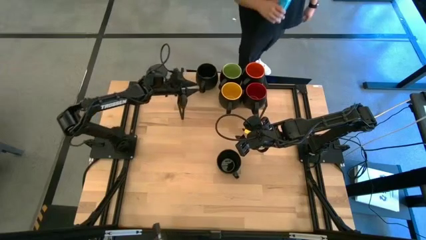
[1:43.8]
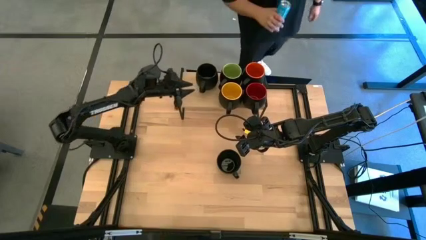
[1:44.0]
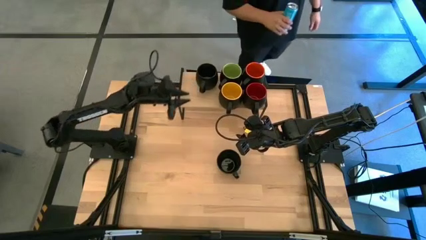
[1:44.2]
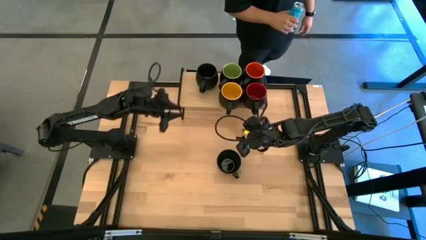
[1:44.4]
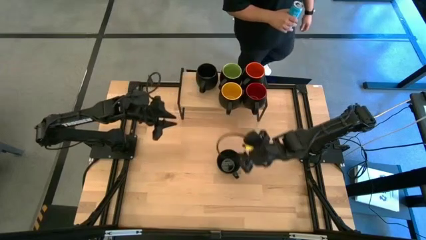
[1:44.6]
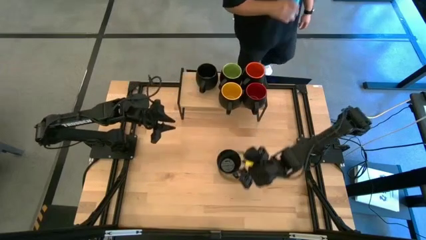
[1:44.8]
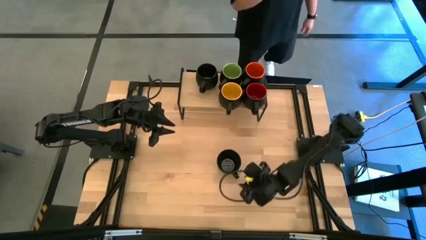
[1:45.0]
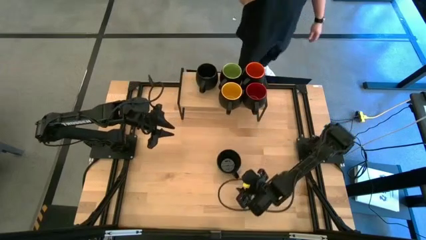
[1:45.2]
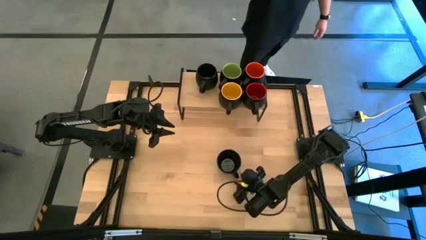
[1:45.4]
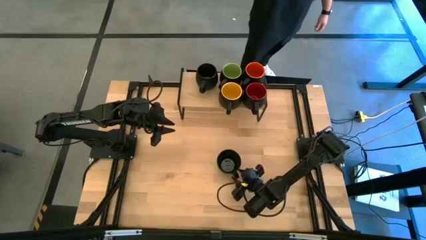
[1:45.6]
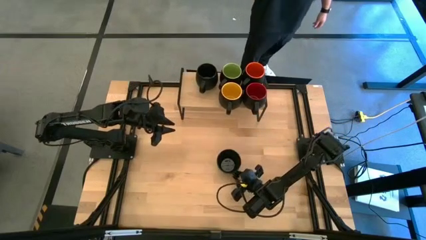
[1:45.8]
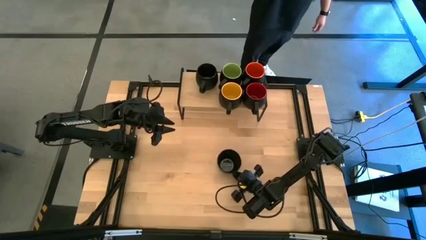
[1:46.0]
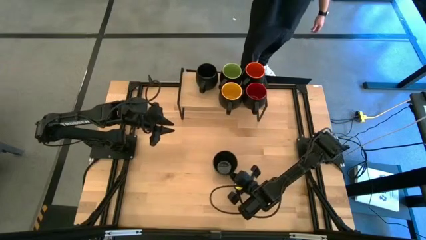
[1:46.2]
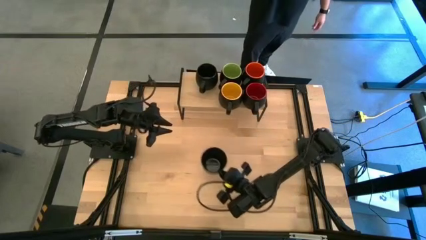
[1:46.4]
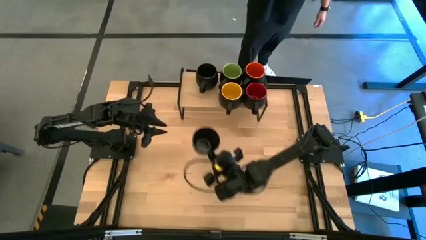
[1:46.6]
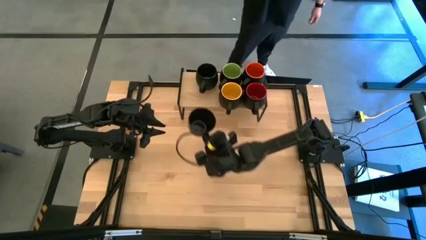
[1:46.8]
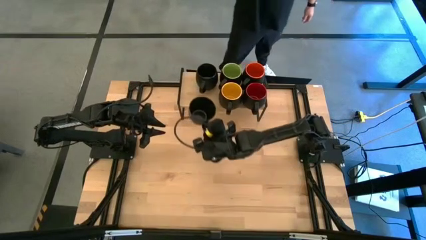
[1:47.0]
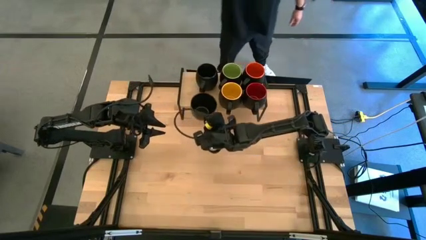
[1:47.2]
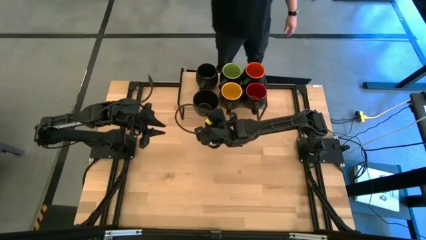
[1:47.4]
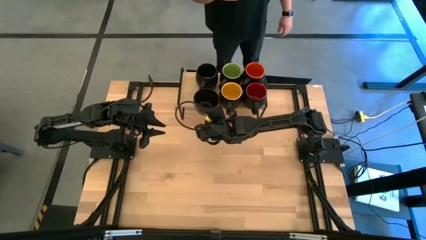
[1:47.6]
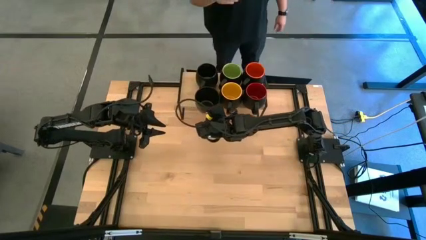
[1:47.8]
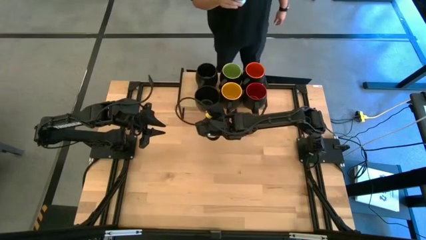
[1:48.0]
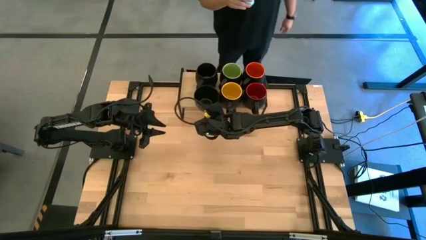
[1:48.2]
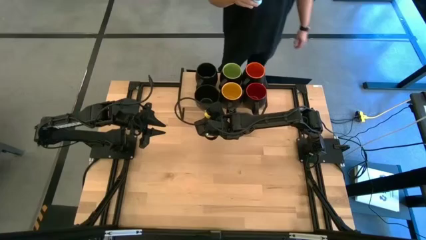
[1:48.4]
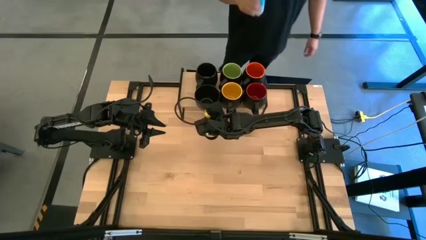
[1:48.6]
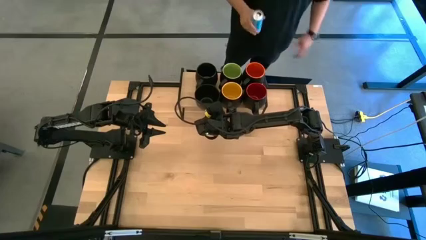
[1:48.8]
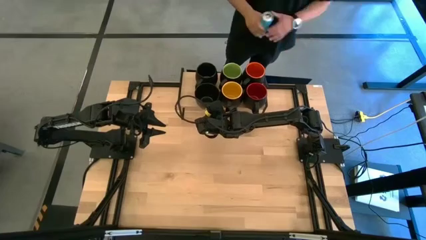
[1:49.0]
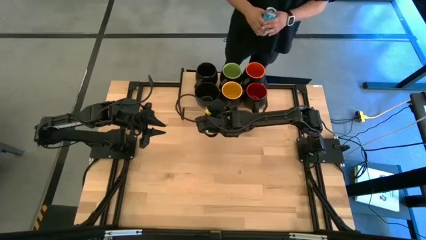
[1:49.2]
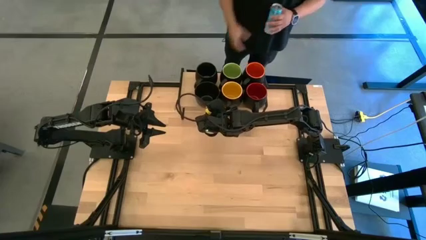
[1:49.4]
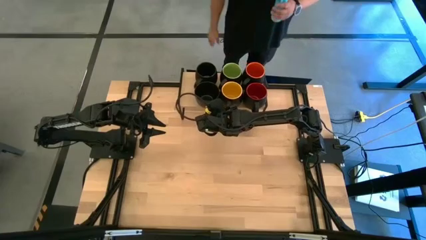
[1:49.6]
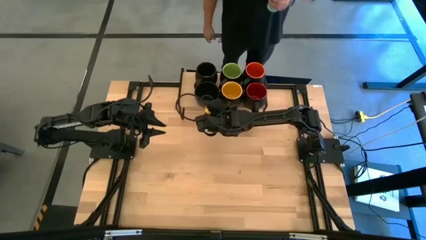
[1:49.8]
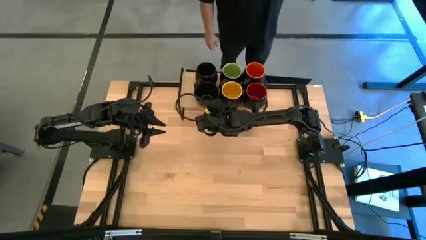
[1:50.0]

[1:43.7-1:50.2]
Task: Place coffee mugs
Put the black mug on the shelf

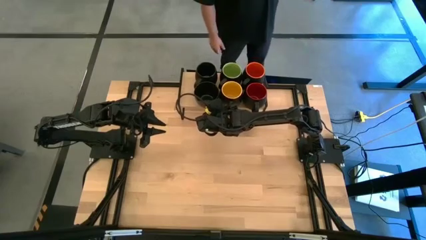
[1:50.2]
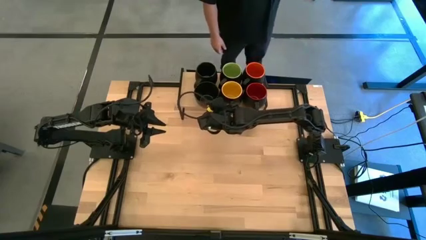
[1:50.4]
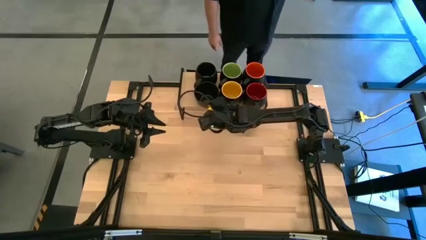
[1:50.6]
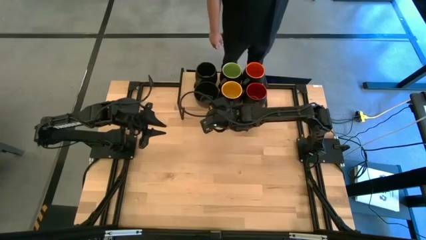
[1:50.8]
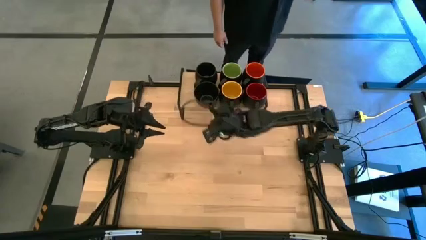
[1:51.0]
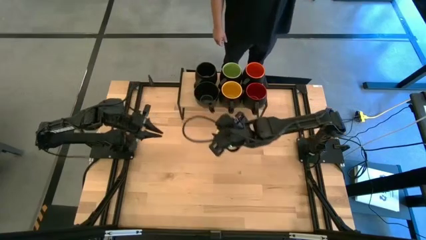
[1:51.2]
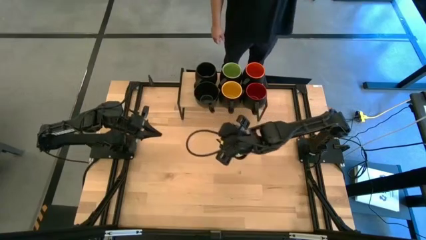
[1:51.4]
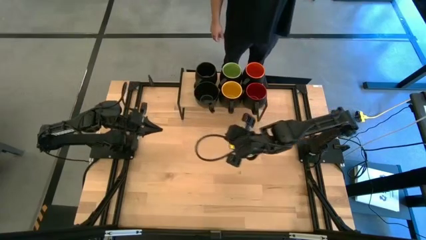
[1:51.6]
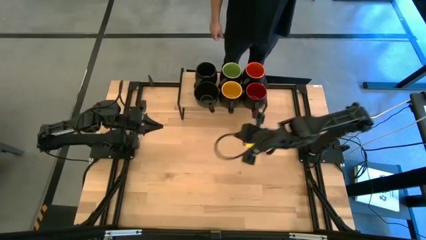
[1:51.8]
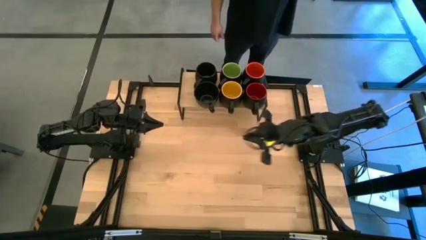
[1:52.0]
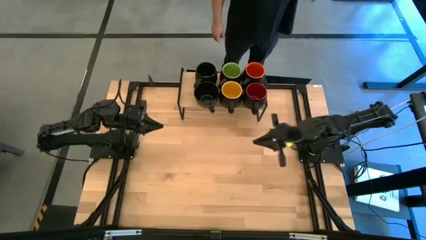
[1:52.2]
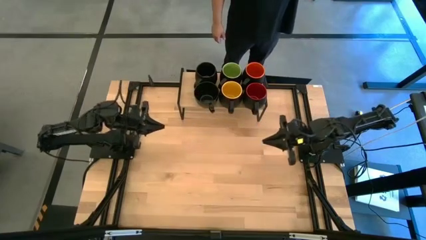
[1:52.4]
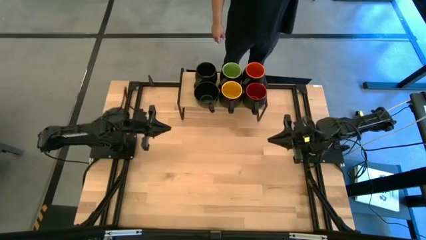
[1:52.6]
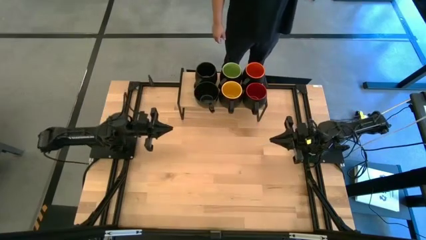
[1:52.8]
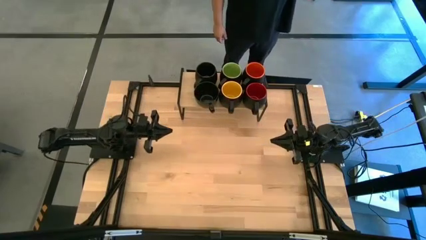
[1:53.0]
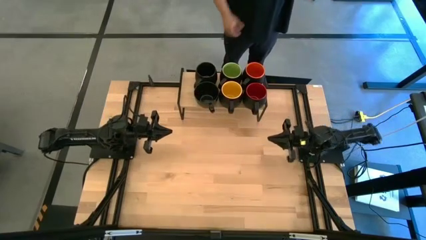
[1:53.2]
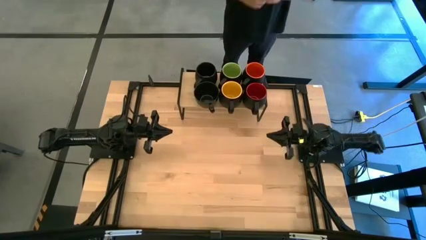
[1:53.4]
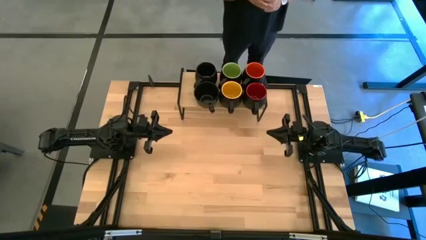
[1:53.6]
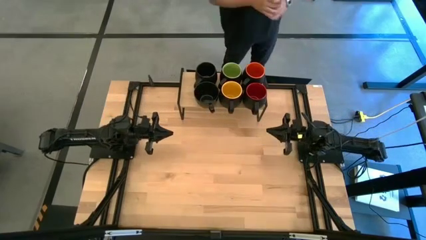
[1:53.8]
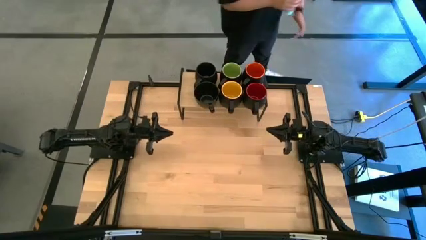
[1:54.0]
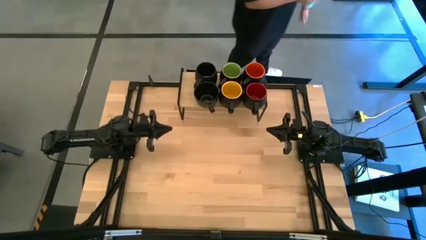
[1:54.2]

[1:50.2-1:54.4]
Return to Home Position

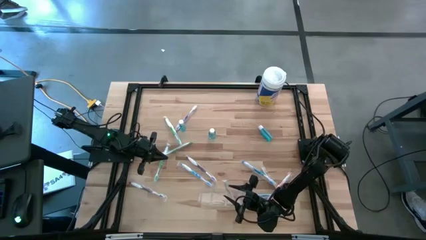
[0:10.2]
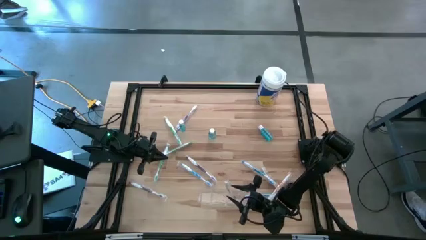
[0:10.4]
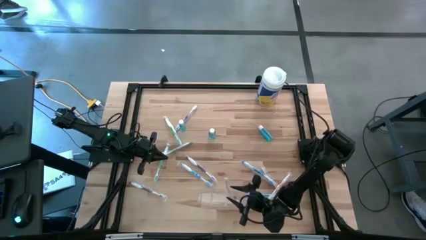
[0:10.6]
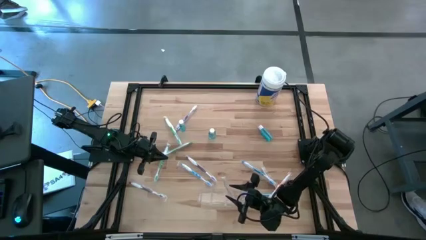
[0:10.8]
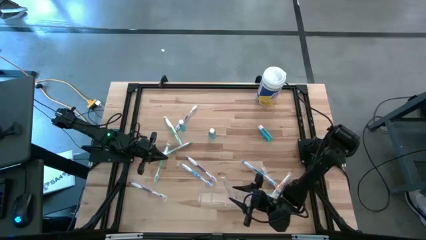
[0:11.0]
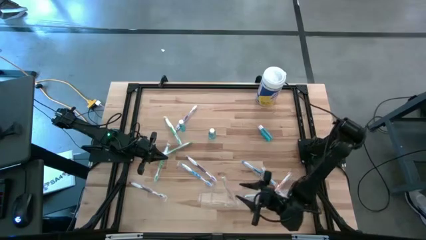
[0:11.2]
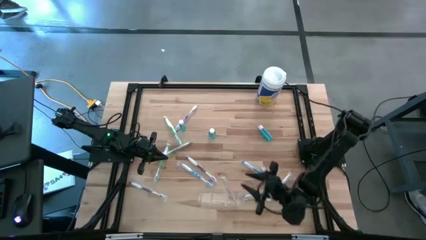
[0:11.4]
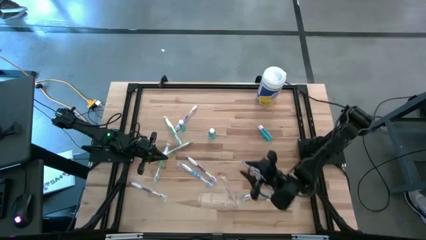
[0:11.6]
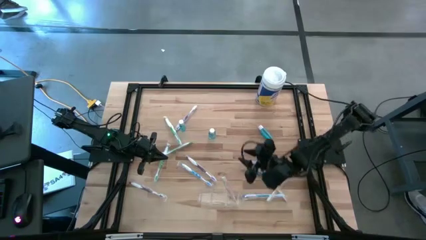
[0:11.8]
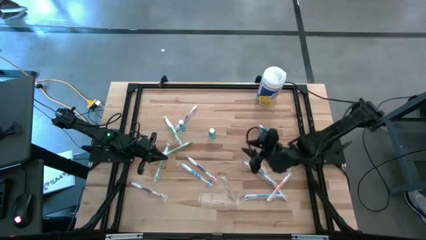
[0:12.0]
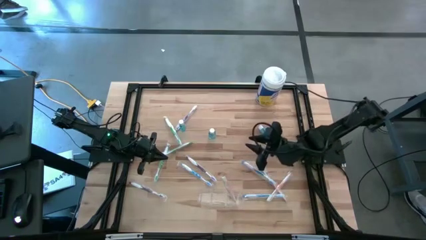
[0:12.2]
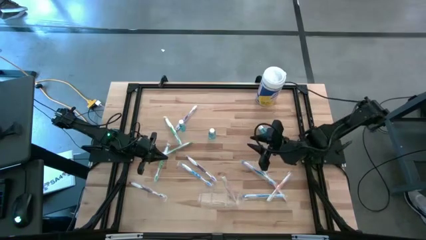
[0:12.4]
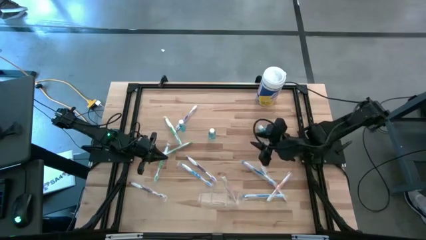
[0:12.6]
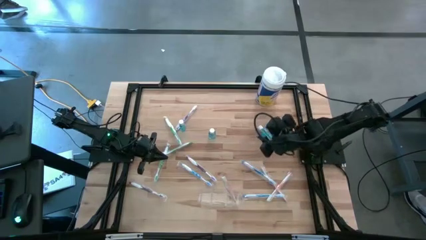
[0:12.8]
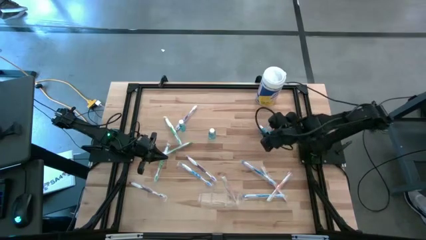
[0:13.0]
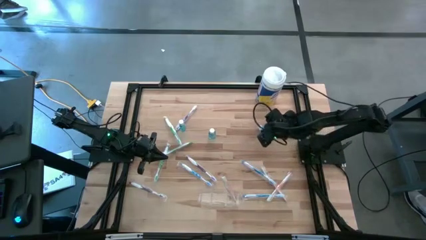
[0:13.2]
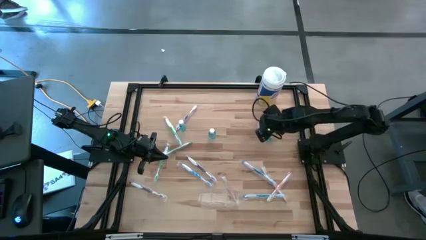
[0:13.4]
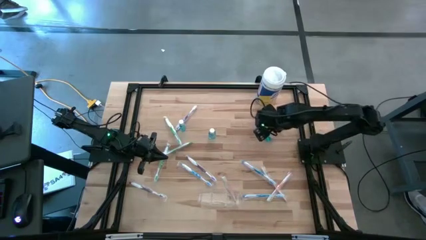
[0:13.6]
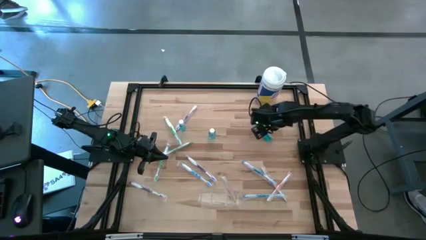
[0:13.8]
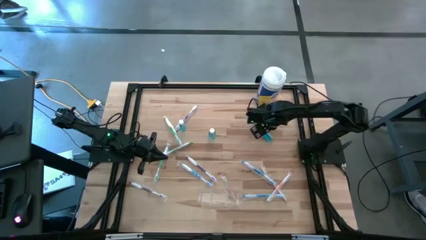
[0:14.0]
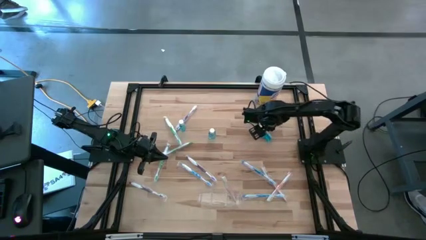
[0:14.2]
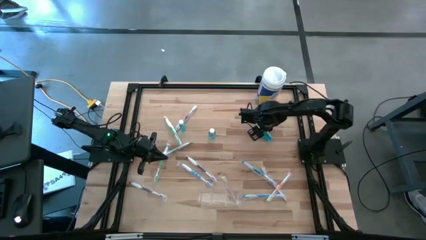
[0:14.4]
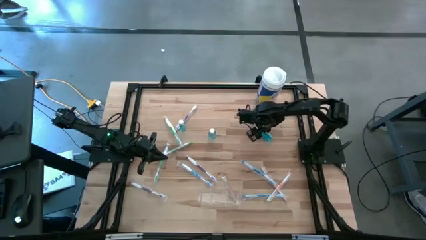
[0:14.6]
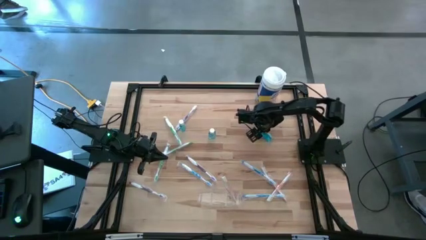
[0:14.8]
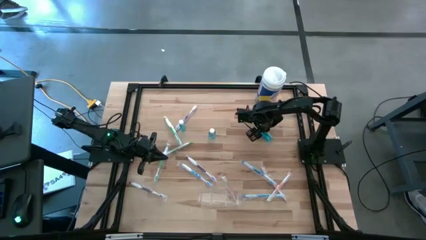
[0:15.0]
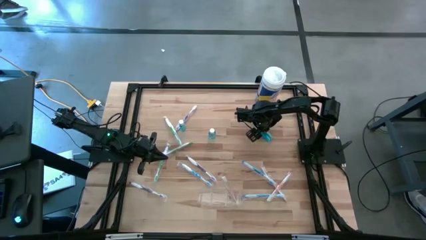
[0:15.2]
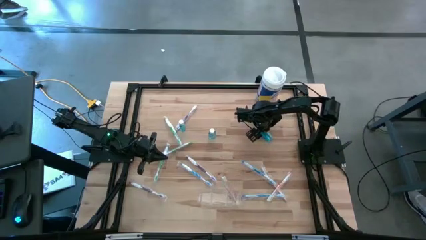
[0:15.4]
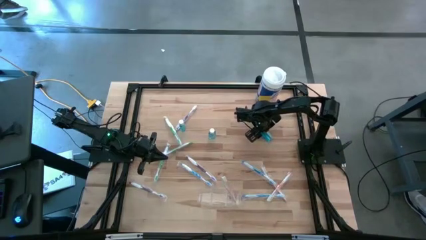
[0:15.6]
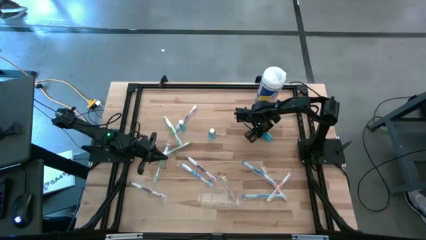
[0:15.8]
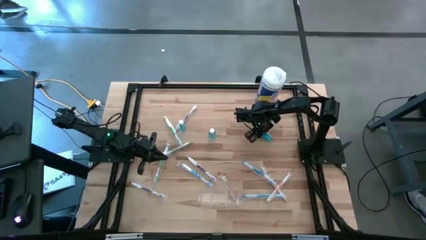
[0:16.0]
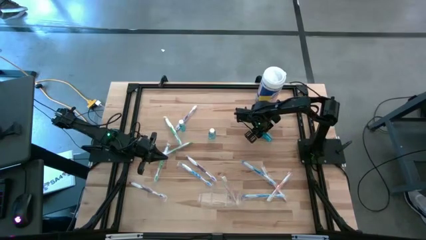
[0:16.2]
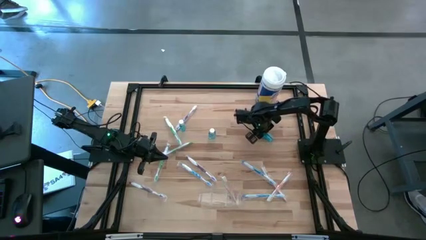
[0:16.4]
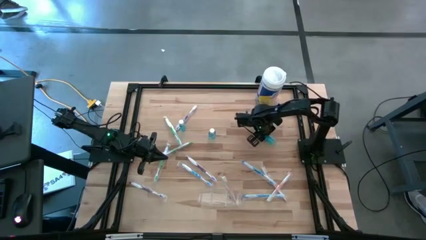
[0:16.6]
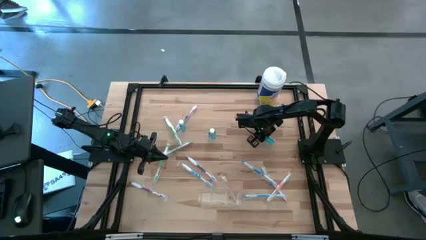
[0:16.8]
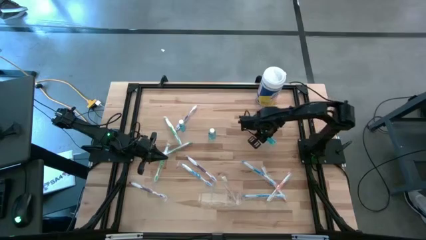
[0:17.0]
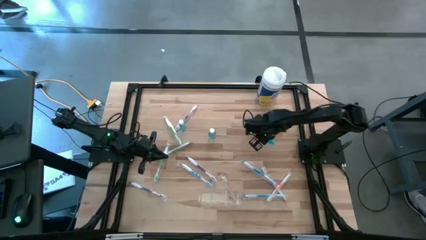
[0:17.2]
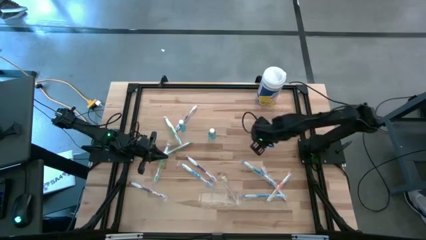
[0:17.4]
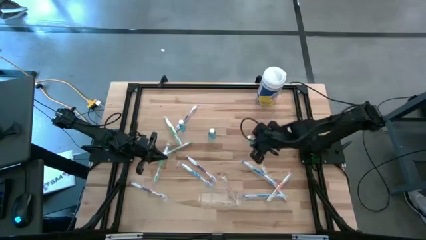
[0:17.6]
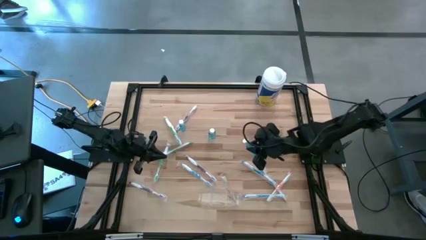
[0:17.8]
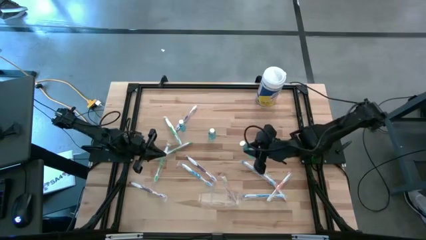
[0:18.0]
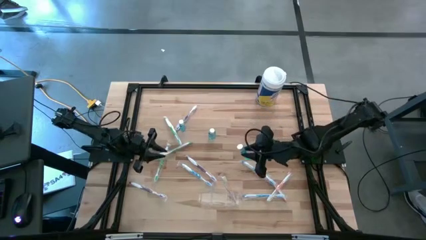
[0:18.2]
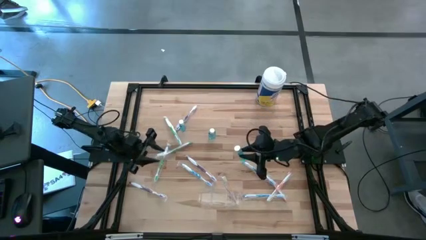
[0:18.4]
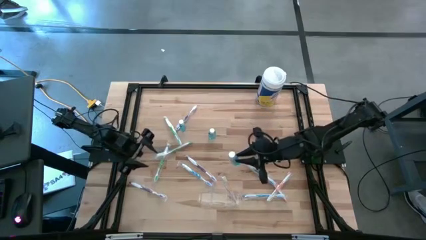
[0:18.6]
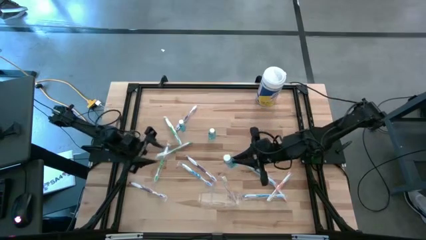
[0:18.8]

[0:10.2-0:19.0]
Task: Pick & Place toothbrushing station
Put the mouthwash into the transparent organizer
